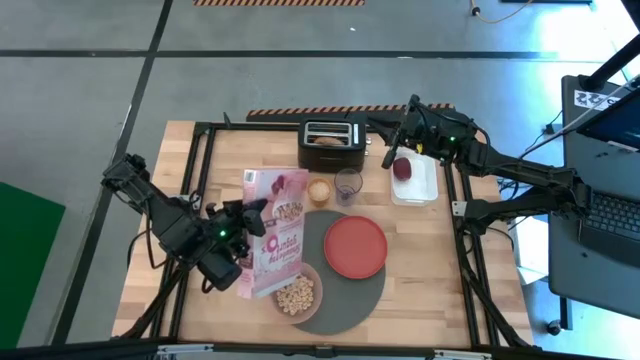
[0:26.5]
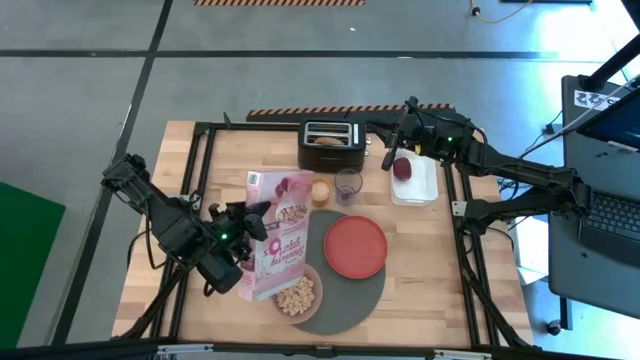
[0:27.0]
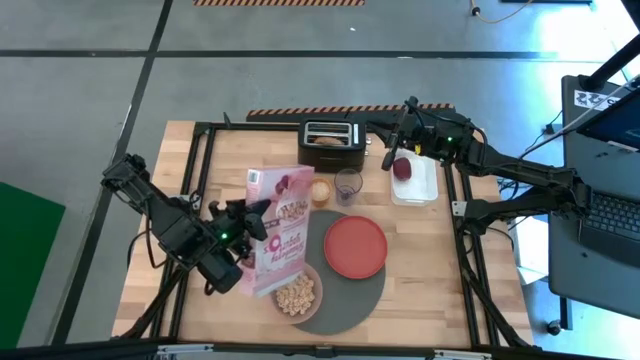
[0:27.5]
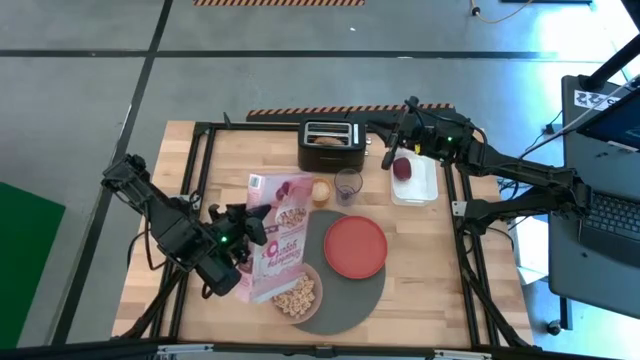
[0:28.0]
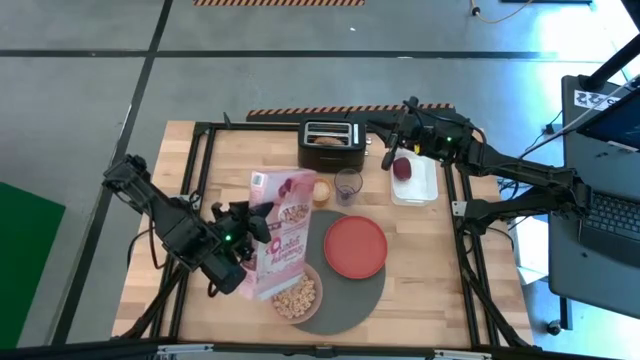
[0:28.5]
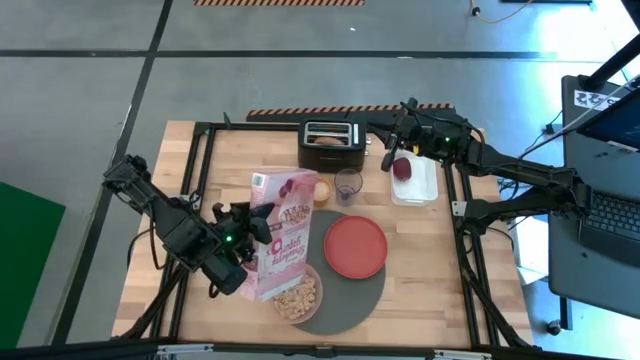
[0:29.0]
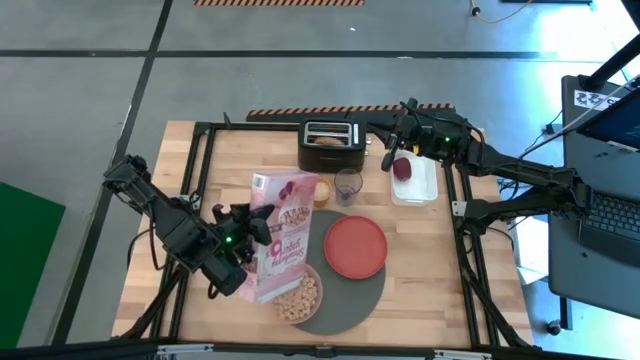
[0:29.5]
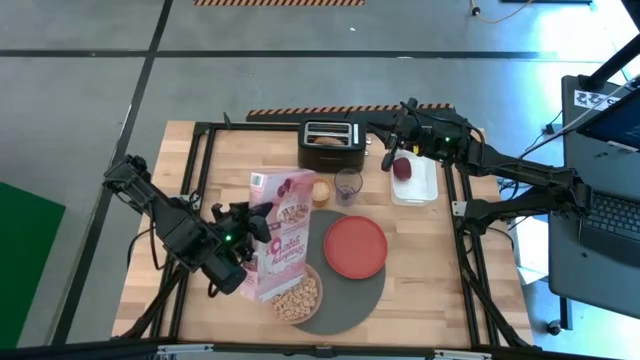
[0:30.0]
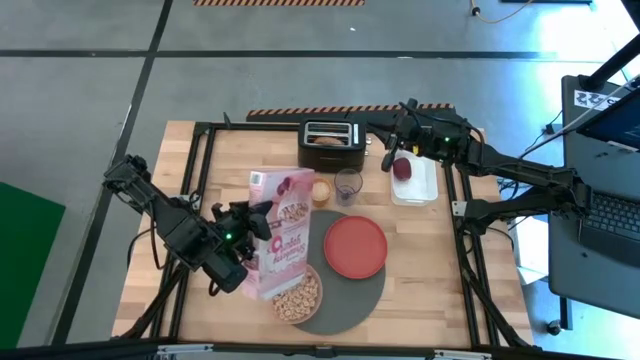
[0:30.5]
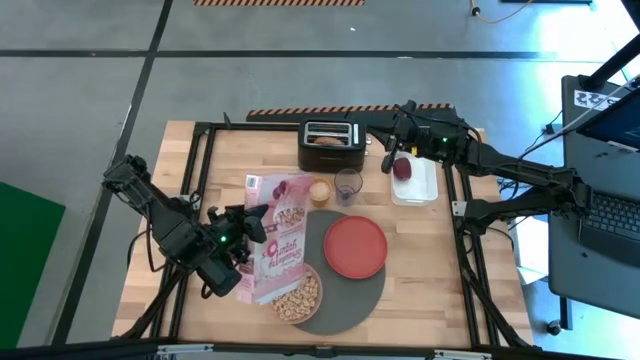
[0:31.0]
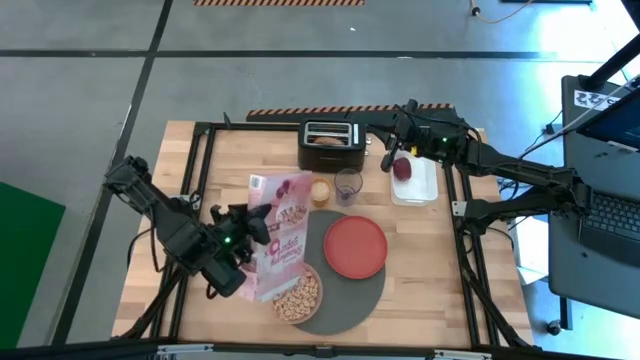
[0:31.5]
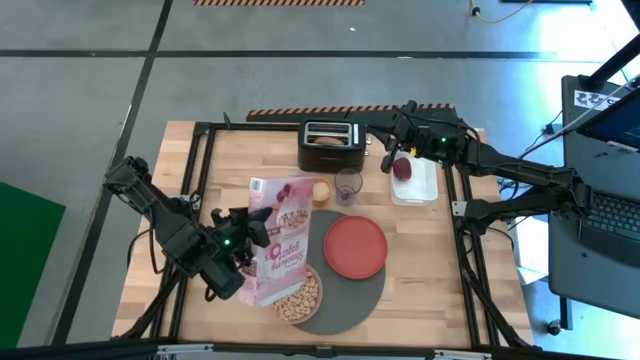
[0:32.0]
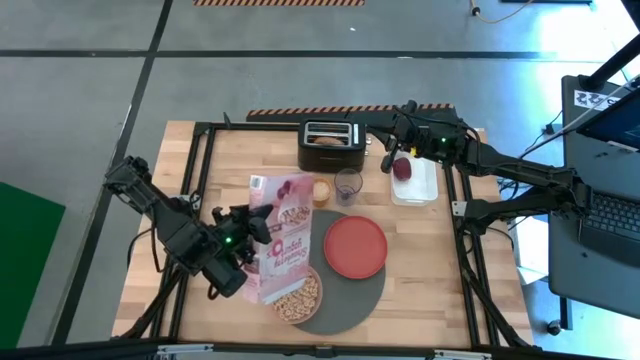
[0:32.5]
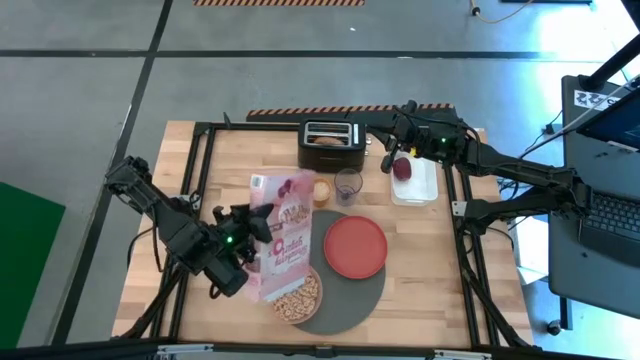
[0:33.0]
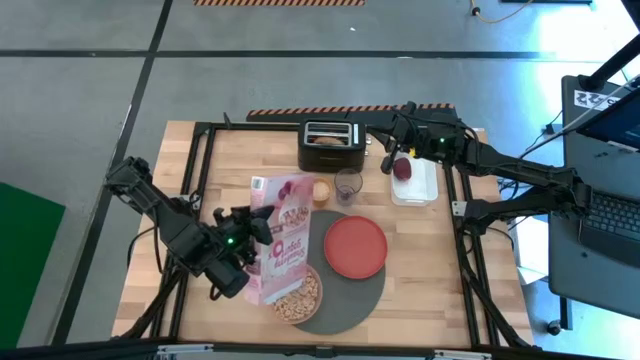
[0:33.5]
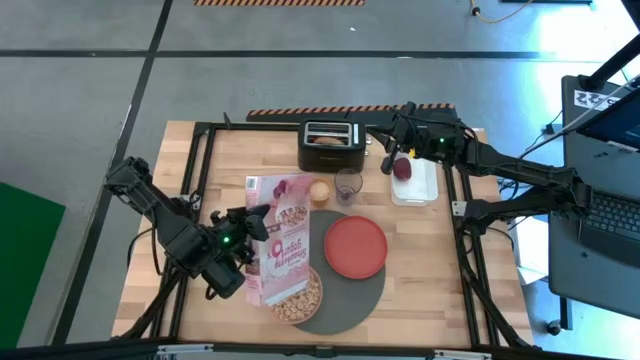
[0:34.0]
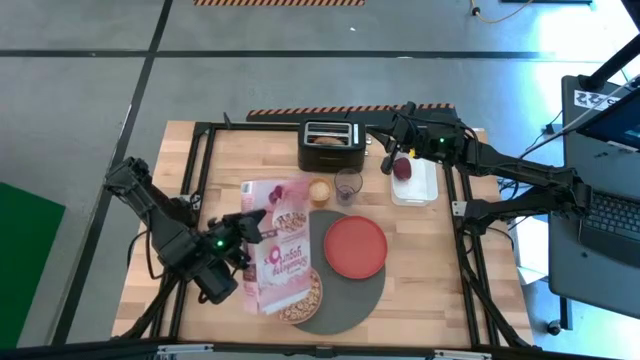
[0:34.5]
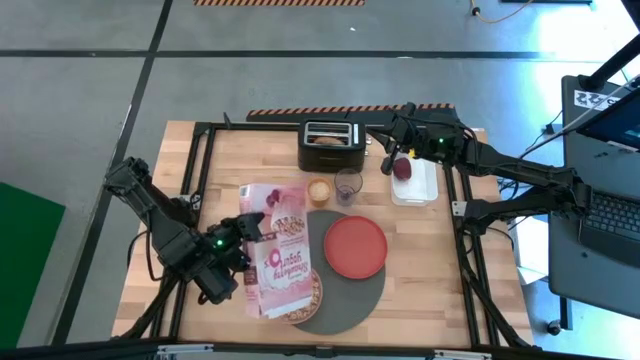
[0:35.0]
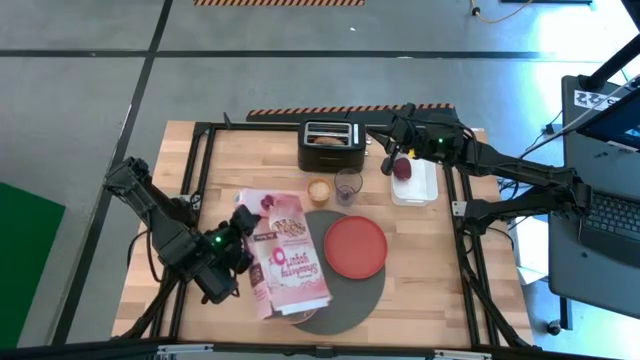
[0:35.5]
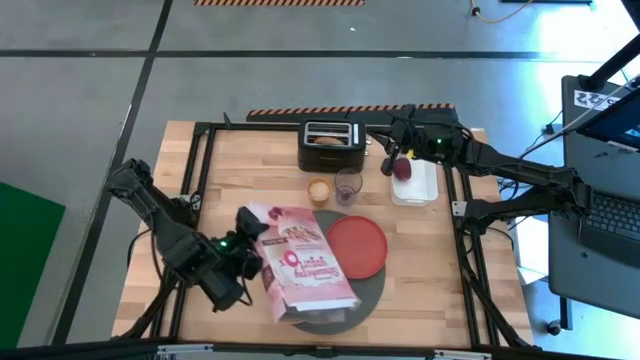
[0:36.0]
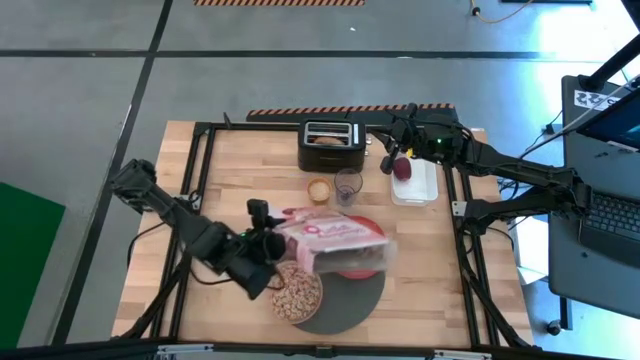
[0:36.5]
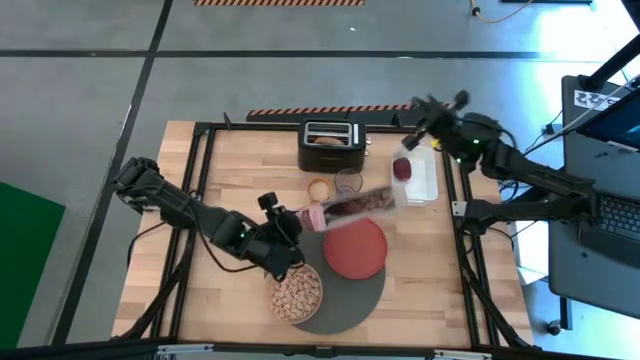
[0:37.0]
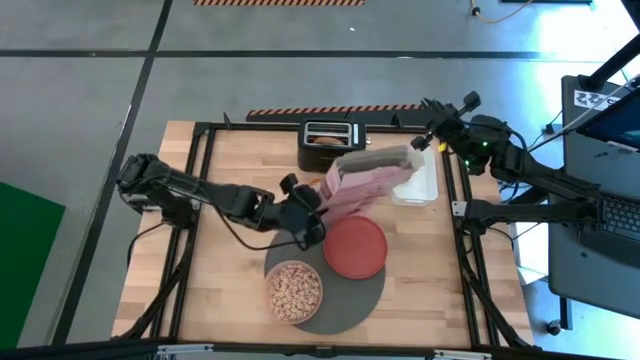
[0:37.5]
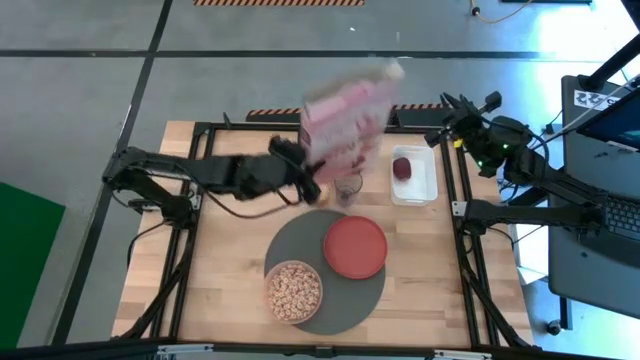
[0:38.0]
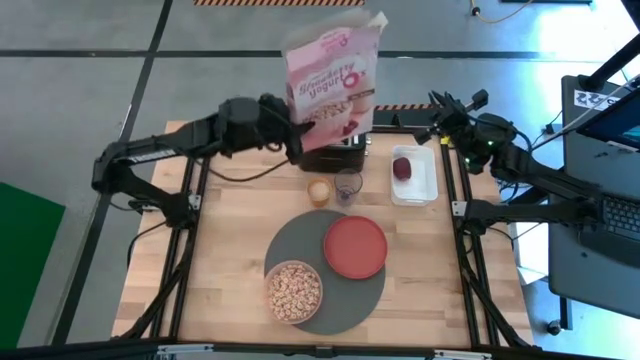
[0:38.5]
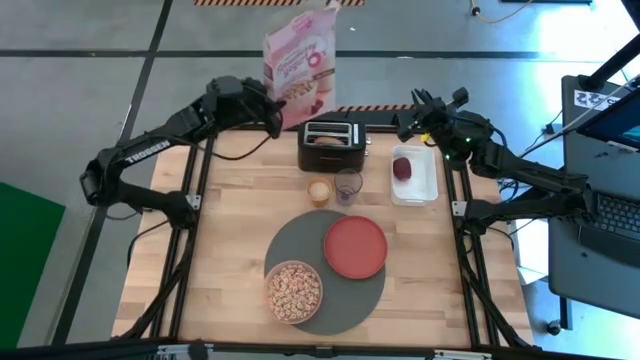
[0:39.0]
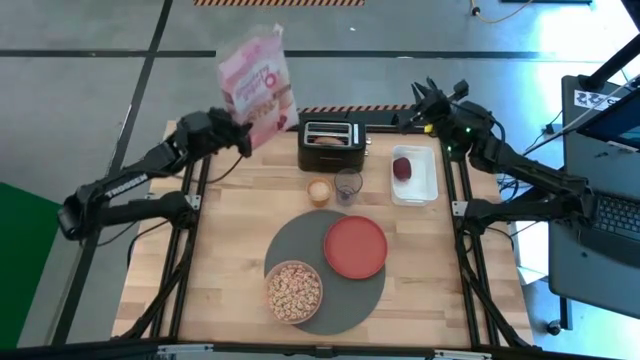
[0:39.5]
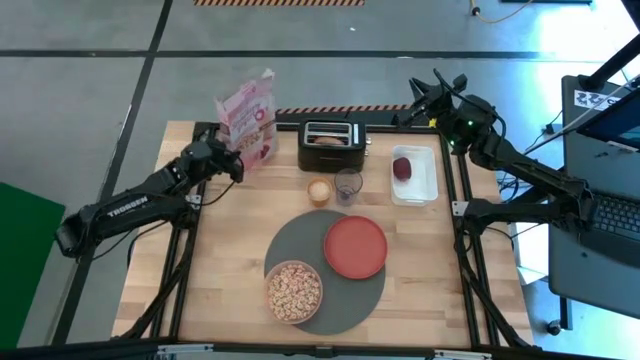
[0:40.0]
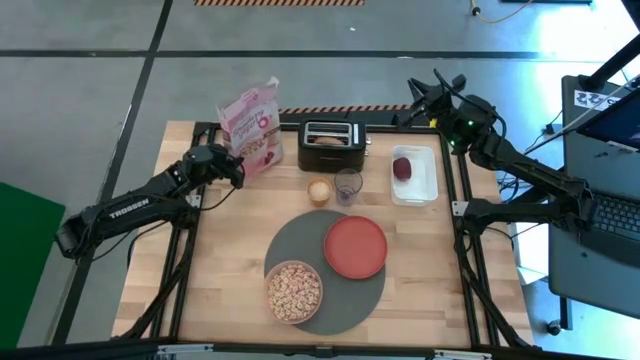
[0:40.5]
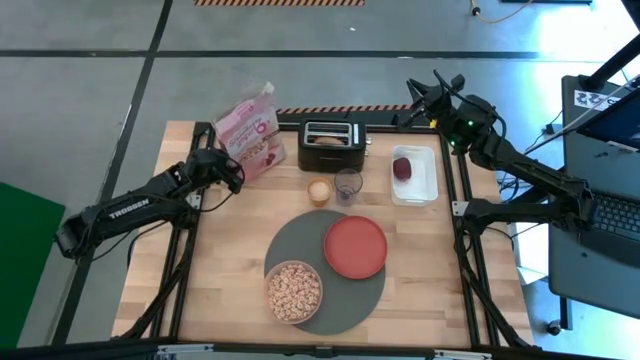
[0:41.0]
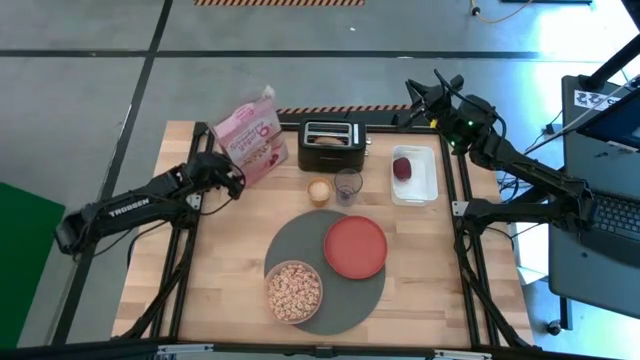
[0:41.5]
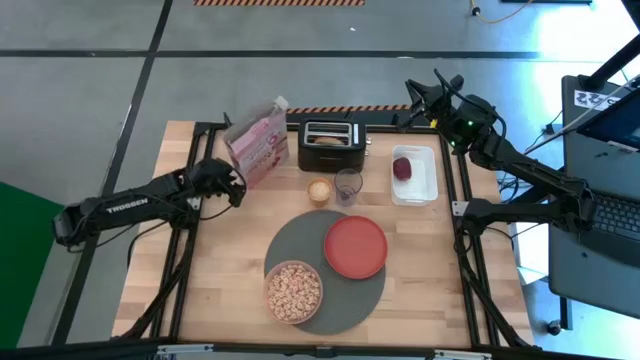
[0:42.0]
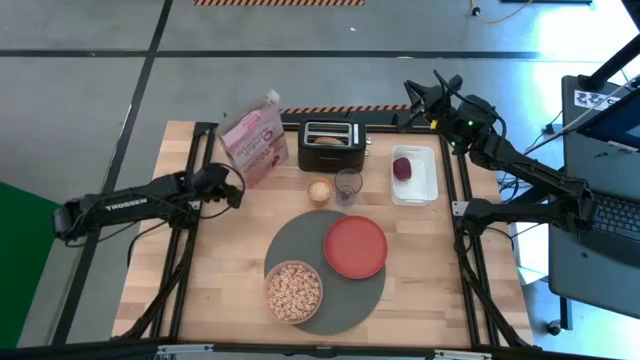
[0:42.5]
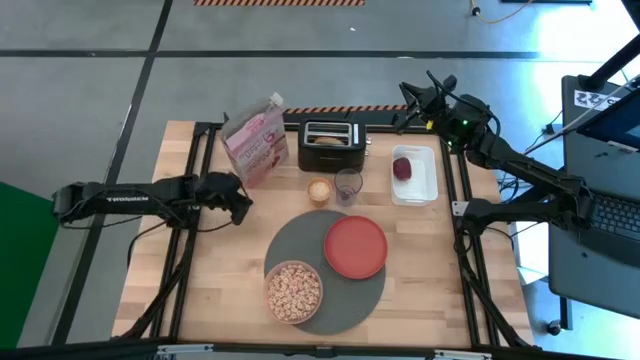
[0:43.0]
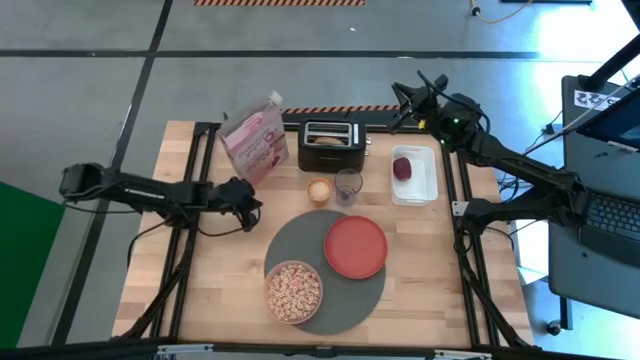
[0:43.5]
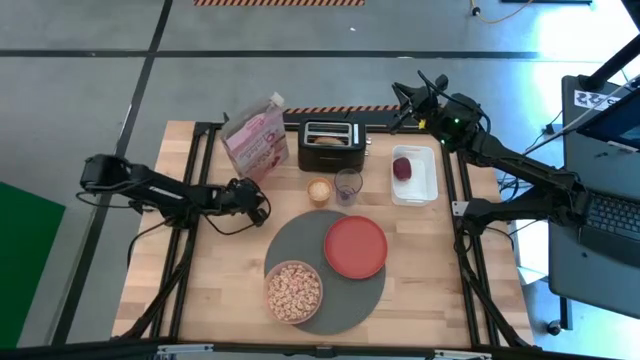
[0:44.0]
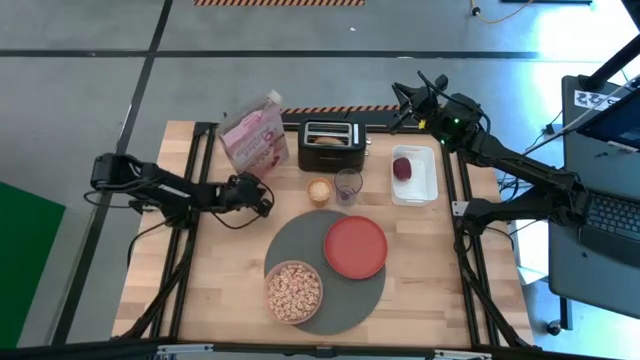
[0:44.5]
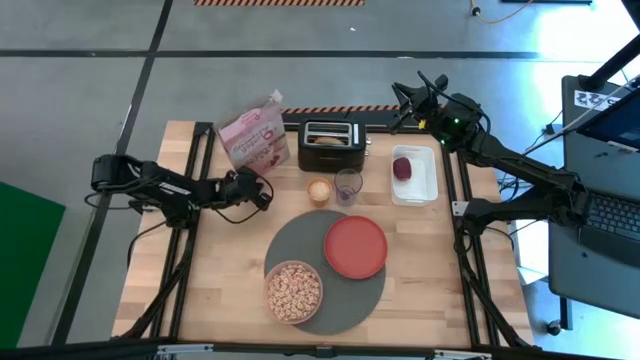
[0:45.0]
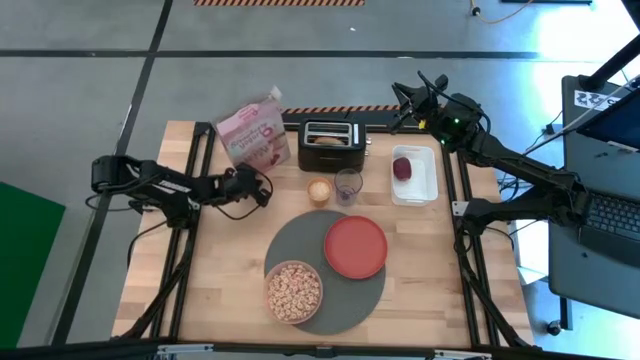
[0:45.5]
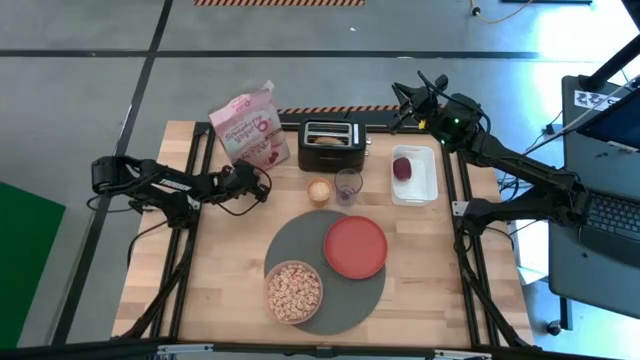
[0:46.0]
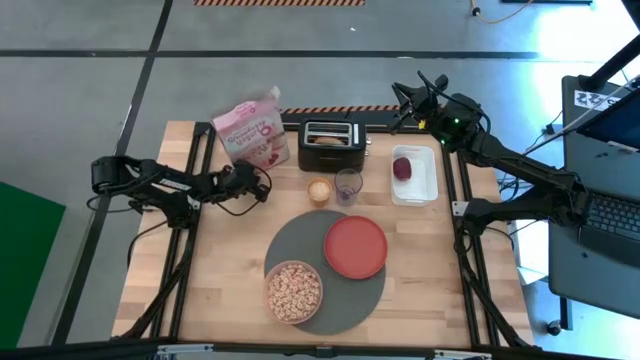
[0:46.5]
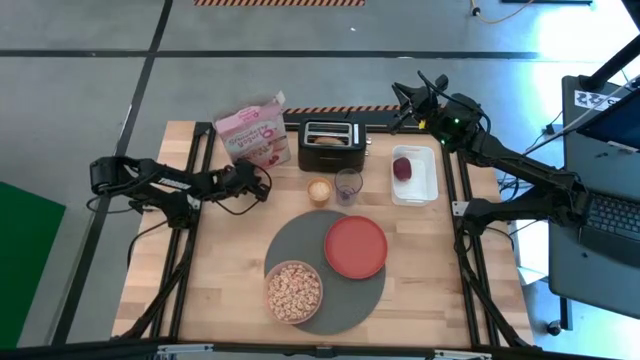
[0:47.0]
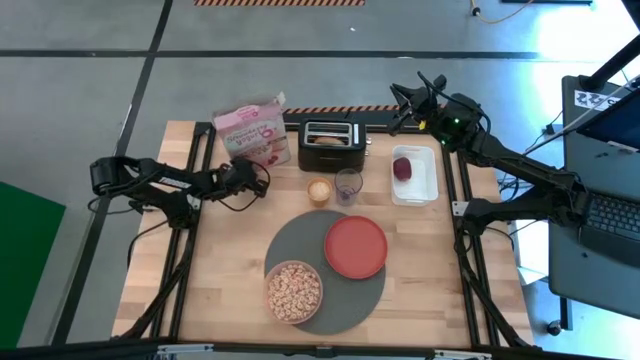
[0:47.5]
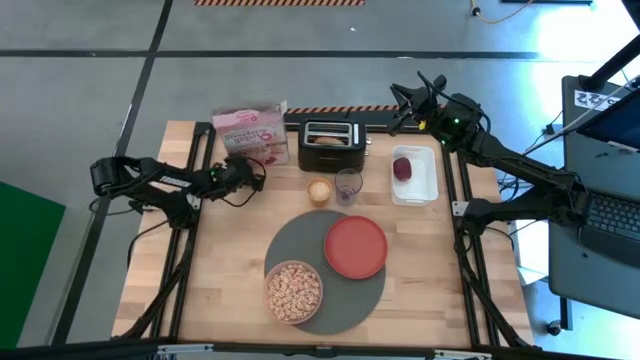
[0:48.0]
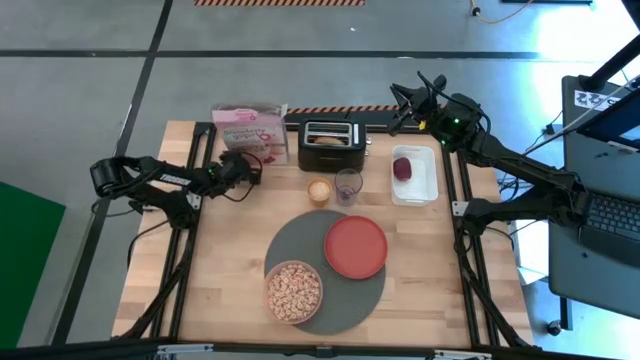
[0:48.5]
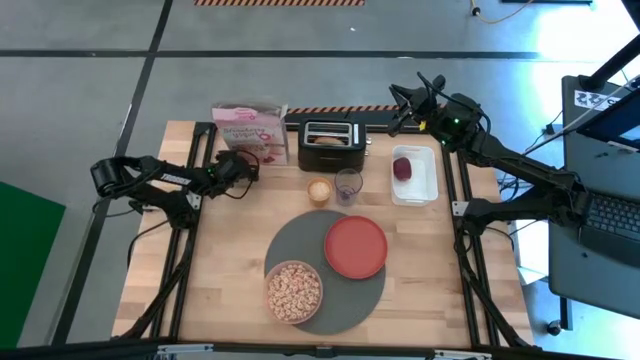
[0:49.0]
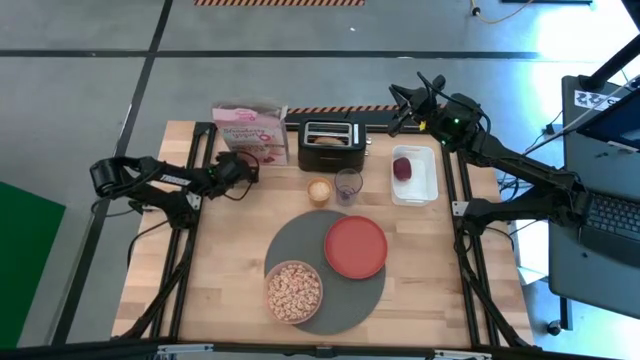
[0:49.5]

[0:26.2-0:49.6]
Task: Arrange a breakfast setting
Pour the cereal from the cereal box into the light pink bowl
